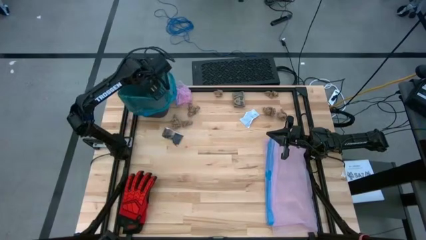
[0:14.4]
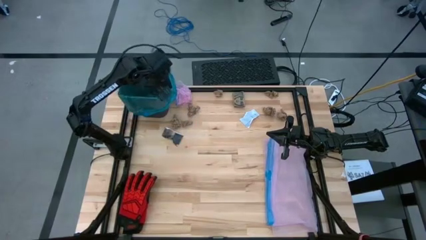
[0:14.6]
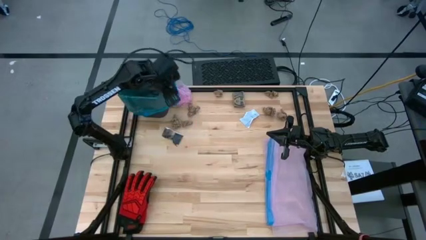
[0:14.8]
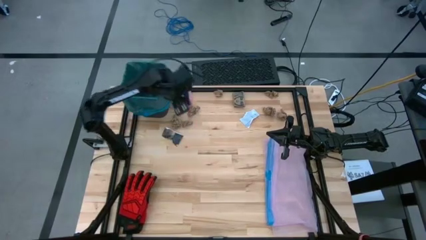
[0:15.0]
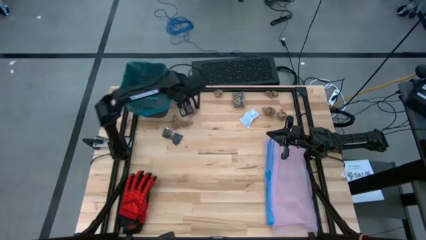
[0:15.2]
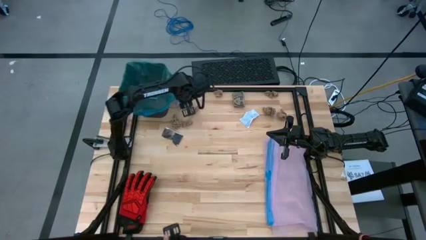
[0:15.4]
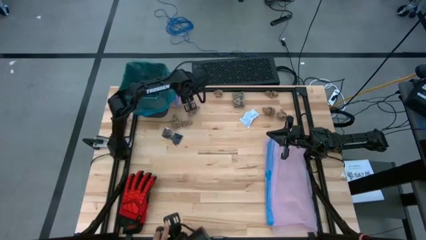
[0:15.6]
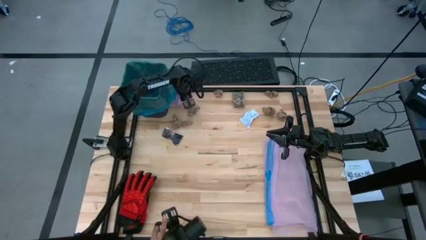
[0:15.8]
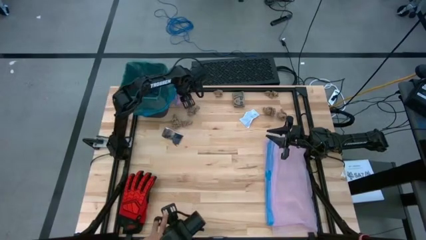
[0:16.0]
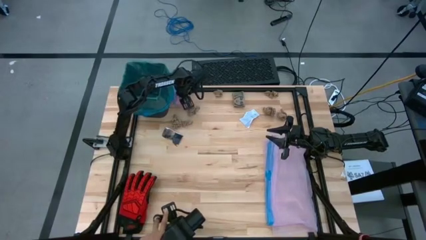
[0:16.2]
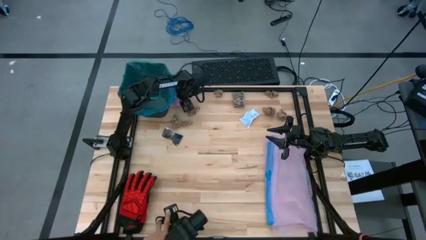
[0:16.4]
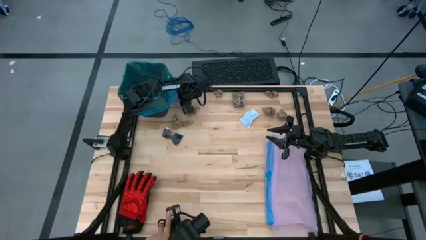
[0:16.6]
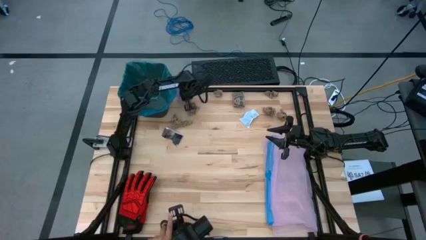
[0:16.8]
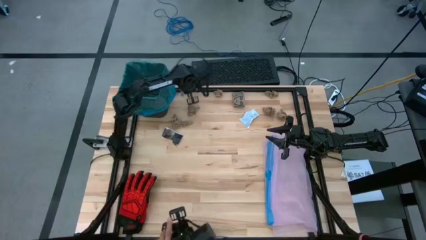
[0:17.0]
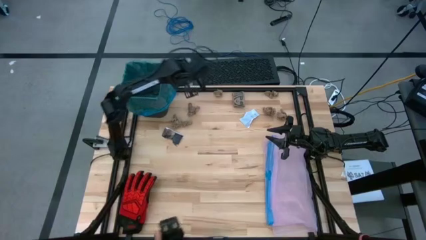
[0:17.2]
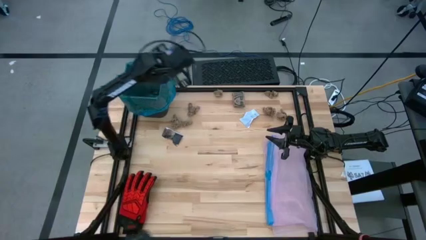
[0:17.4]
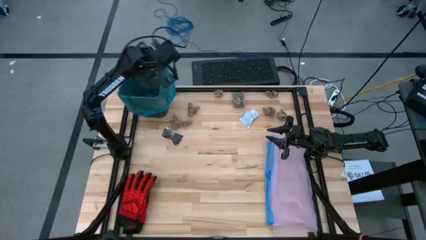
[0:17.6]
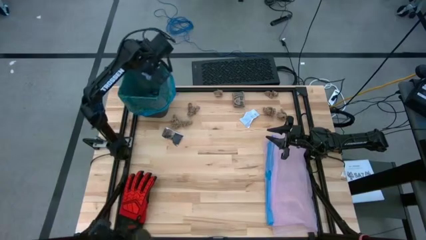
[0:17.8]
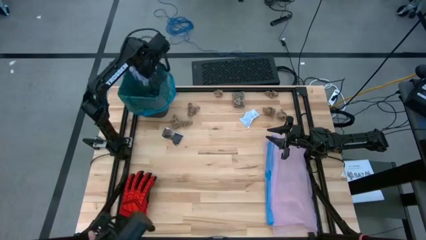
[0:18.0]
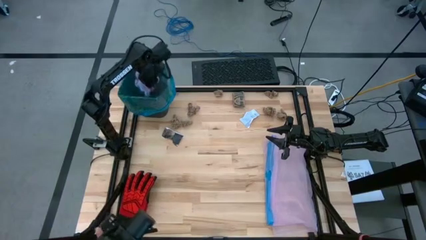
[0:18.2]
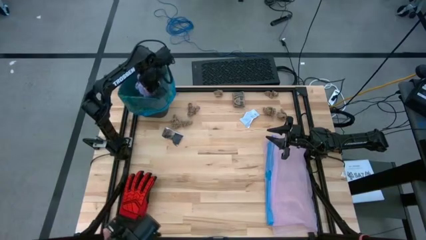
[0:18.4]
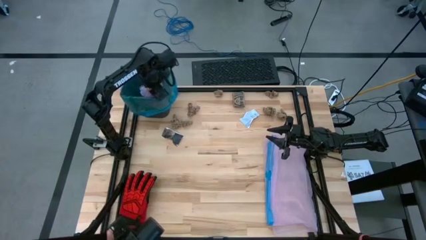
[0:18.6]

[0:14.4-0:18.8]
Task: place trash/remove bag and relplace
Put the pink plastic cellophane in the trash bin

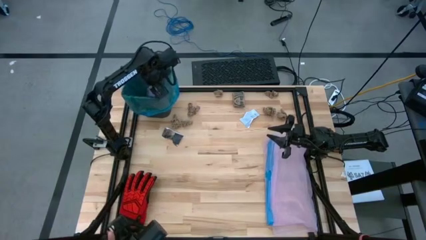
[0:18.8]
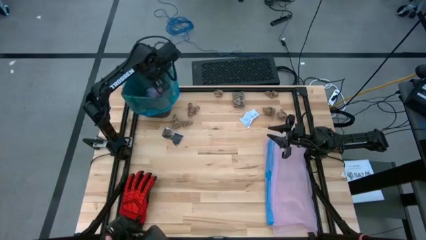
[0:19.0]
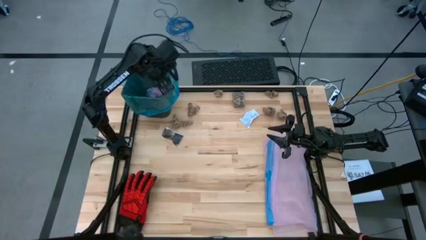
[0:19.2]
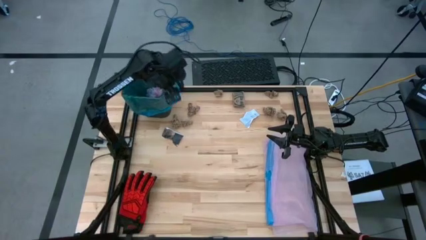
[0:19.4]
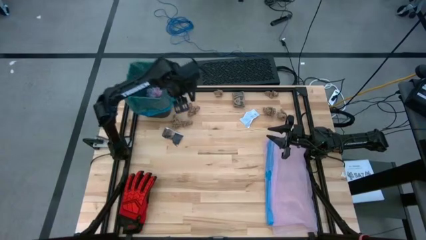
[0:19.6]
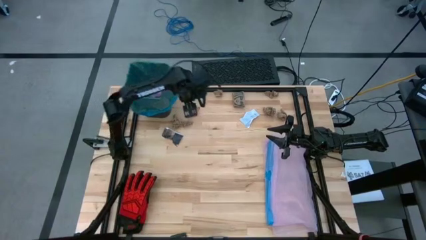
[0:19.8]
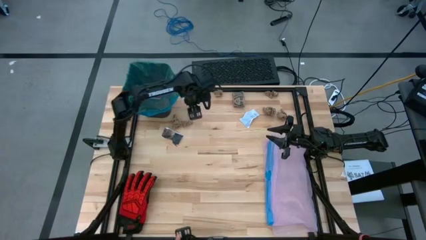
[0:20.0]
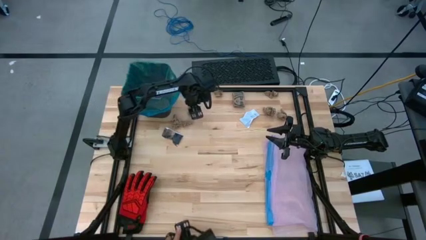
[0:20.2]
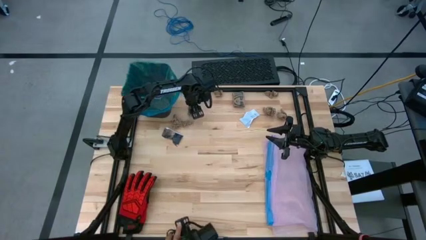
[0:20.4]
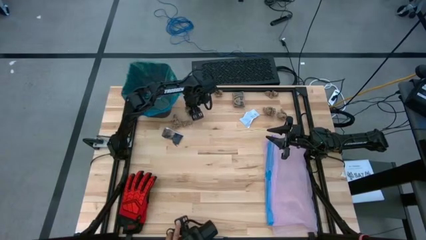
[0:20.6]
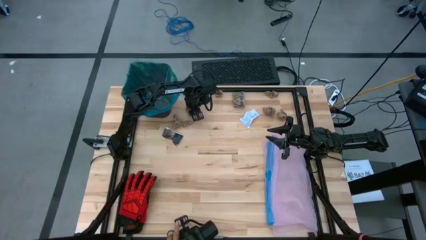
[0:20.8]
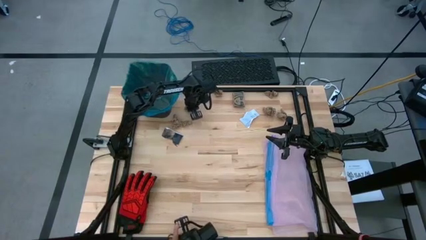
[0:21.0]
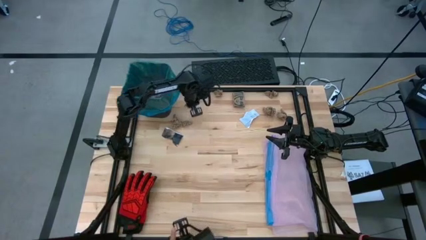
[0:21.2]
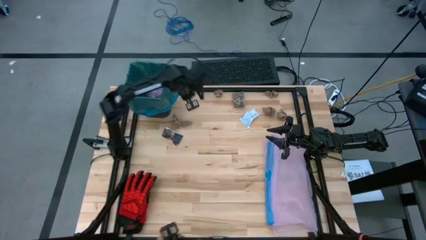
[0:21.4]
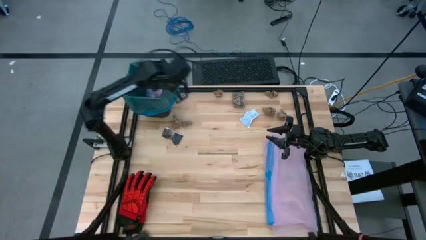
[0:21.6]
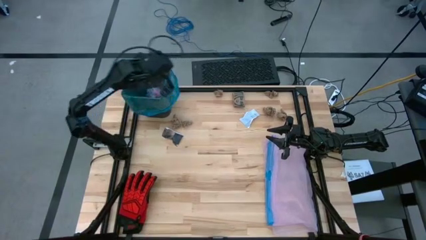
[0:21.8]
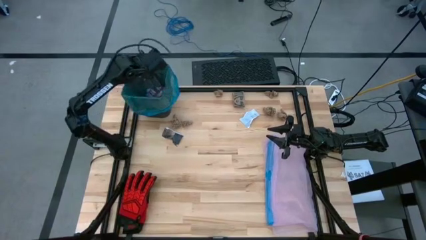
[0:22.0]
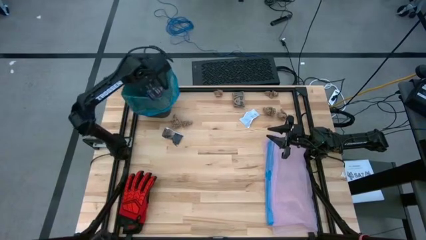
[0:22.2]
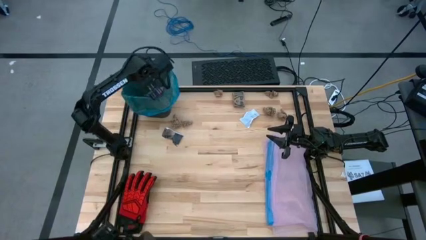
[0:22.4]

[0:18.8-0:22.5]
Put the brown napkin in the trash bin

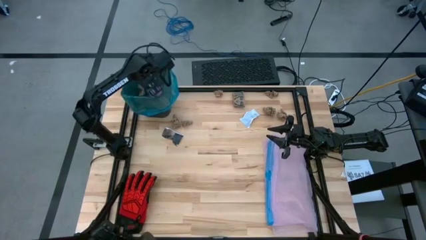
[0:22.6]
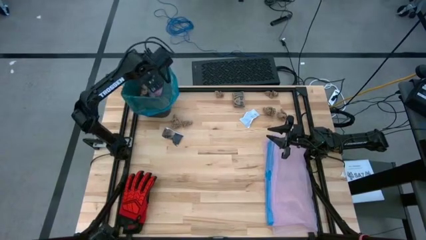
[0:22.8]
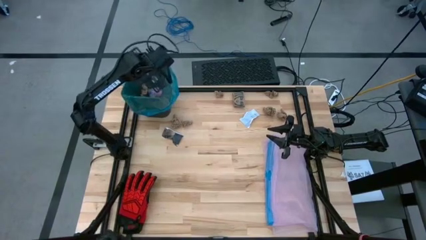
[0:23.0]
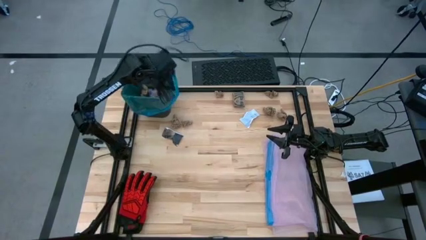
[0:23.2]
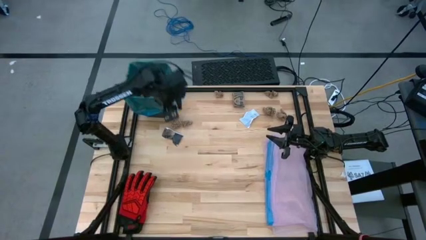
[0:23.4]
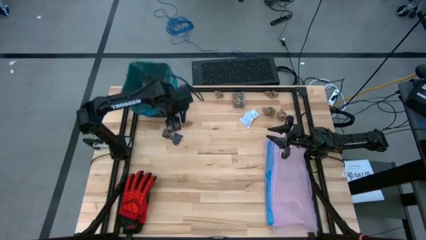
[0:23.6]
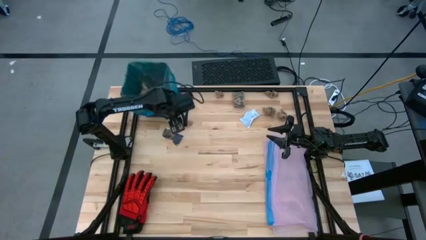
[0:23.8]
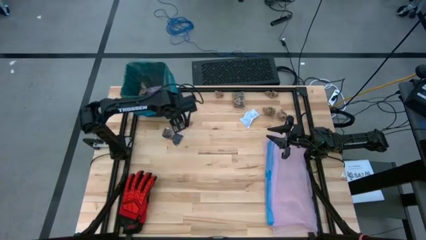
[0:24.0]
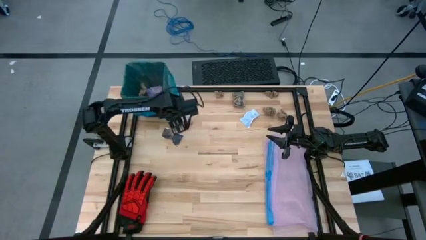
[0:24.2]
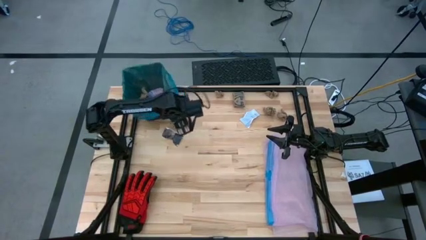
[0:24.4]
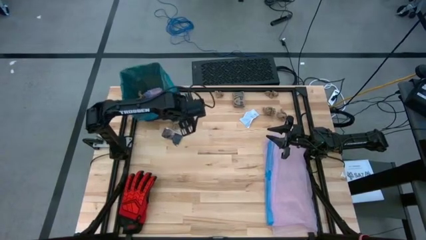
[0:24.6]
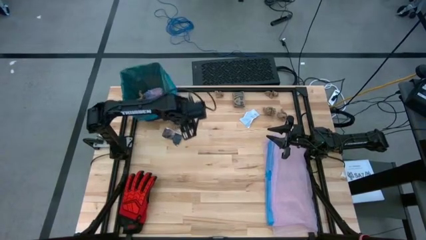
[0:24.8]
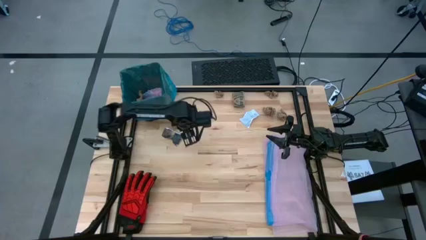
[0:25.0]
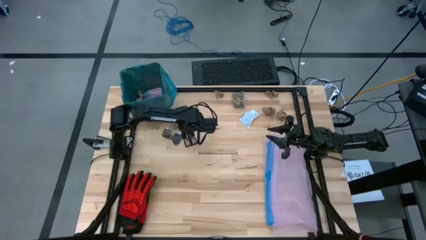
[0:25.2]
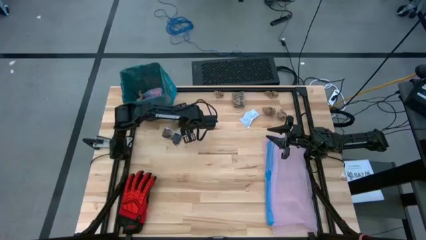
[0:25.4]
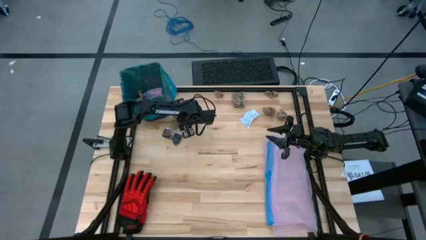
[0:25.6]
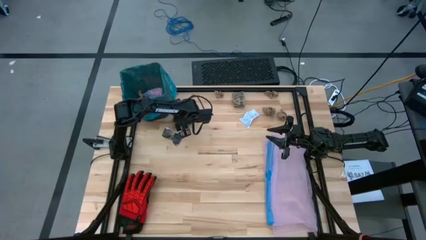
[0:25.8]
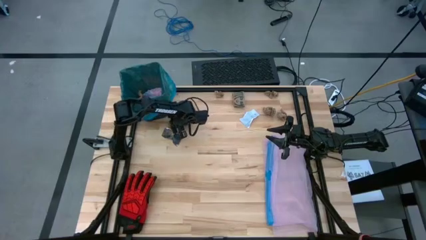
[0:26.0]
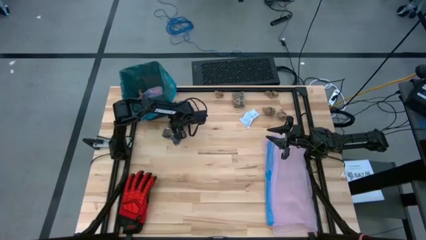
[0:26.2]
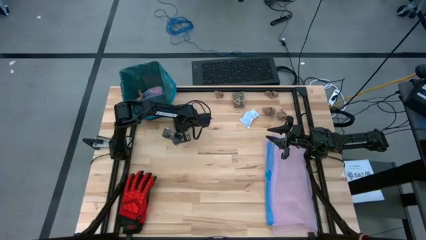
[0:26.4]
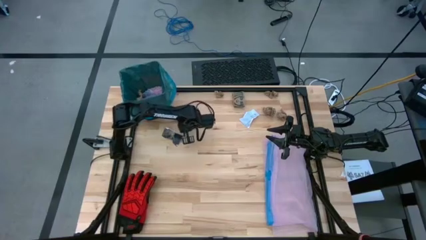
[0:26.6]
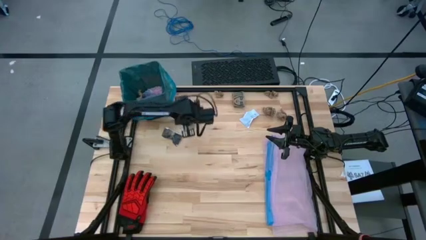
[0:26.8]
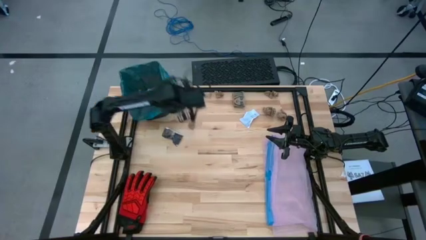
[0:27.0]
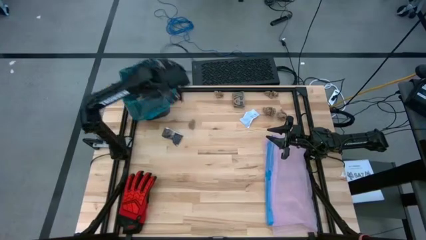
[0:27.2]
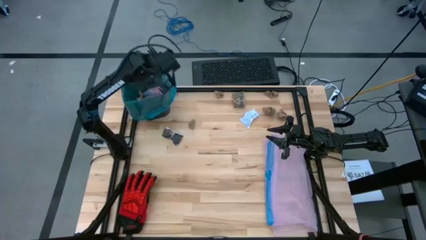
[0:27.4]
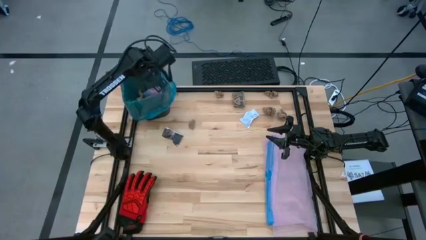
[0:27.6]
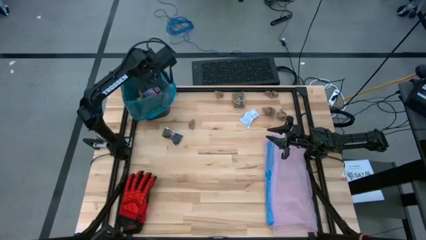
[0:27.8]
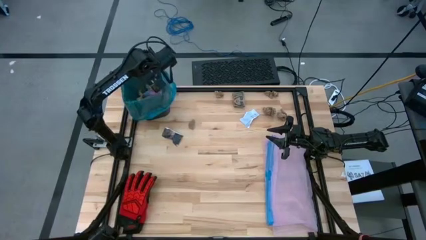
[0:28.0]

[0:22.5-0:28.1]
Put the brown napkin in the trash bin

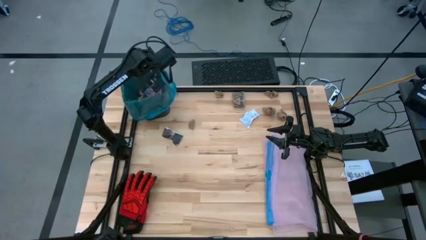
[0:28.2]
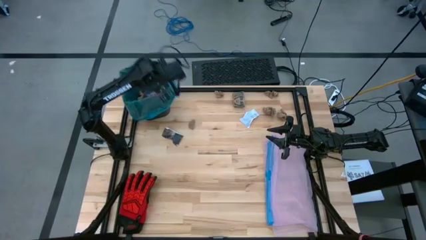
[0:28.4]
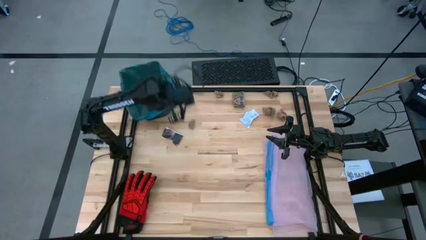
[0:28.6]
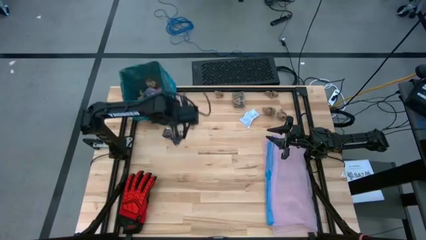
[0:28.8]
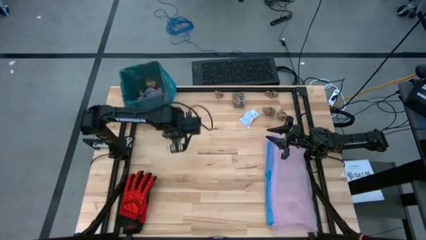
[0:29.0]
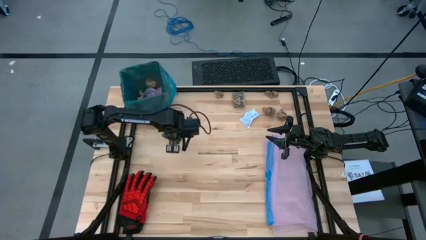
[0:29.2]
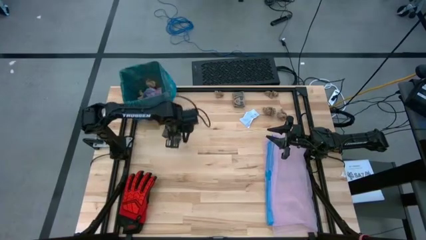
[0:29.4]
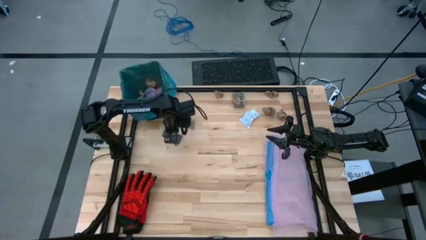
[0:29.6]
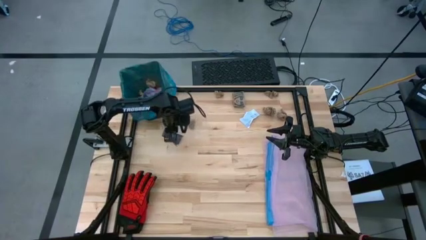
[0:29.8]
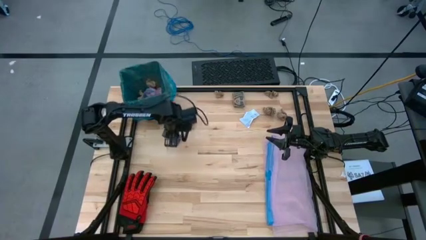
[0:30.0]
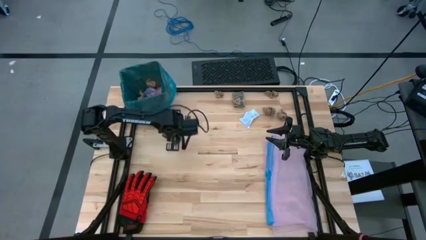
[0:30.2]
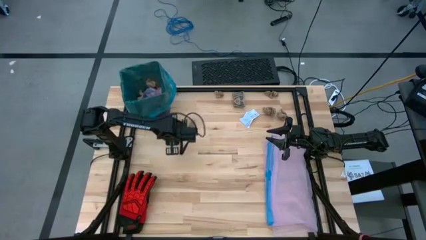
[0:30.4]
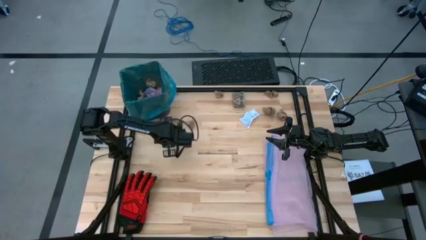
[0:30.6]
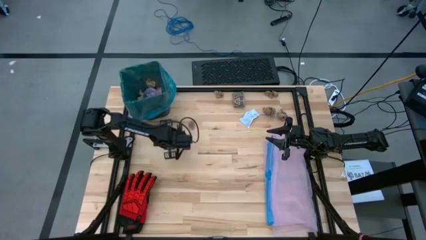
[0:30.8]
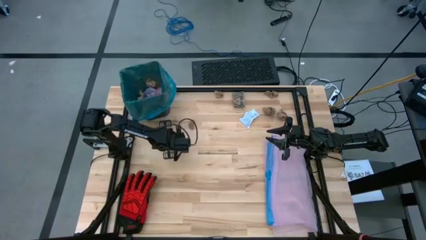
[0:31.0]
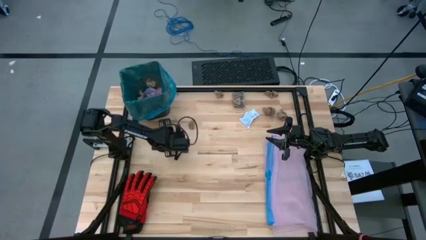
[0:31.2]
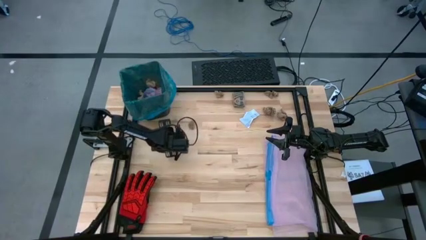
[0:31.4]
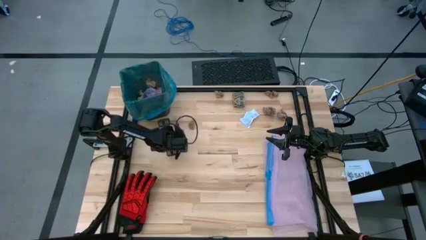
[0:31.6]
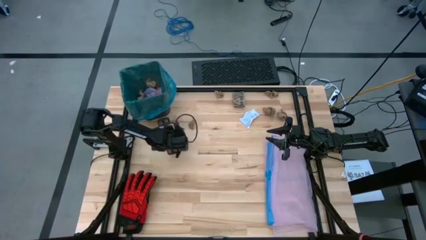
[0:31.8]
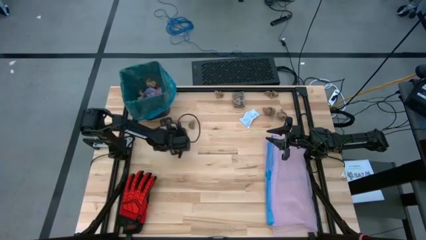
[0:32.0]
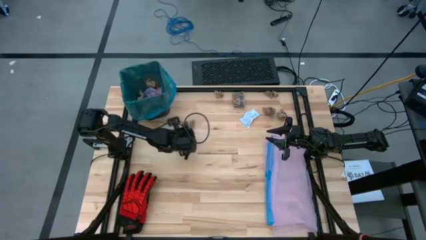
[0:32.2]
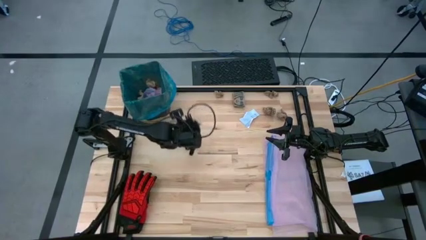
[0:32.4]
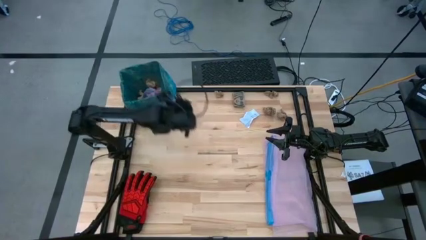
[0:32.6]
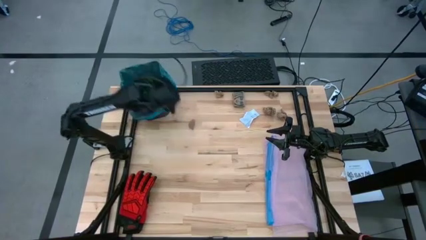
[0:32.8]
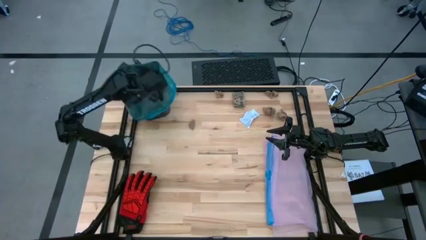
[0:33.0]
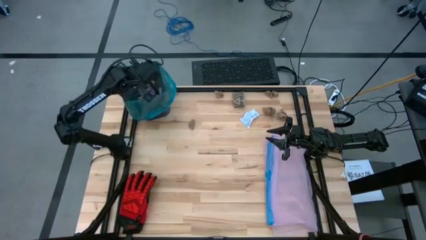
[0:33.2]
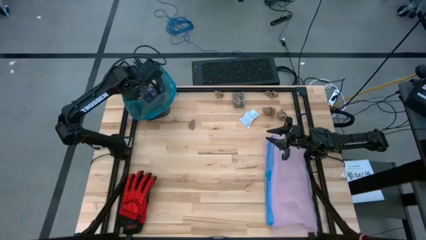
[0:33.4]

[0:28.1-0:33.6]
Put the black paper in the trash bin
